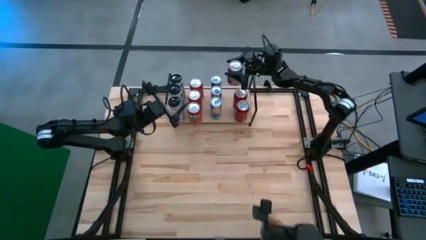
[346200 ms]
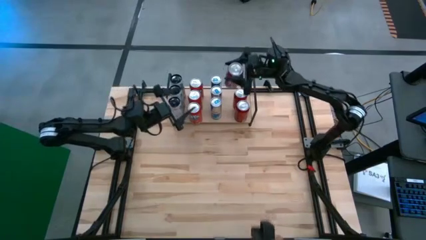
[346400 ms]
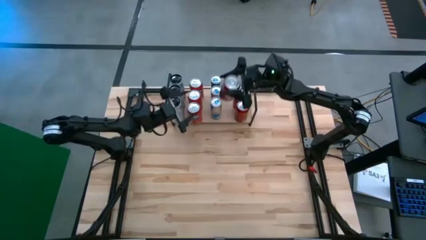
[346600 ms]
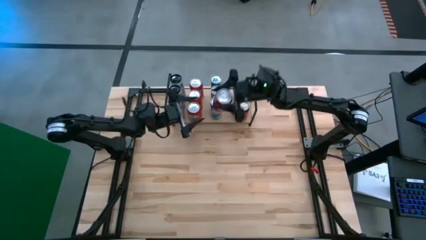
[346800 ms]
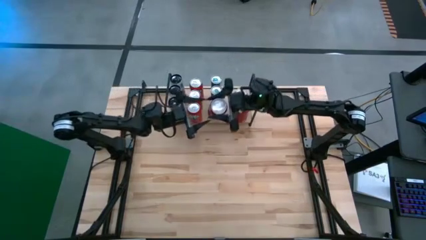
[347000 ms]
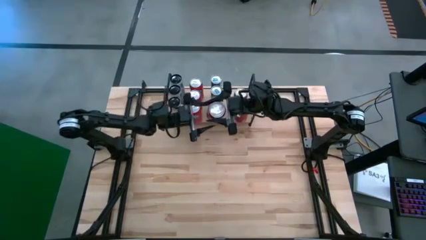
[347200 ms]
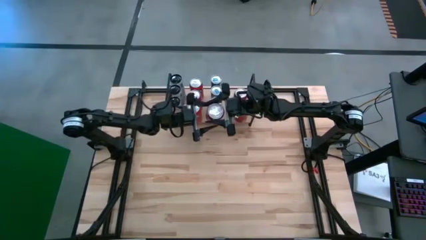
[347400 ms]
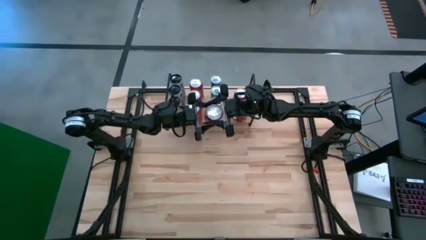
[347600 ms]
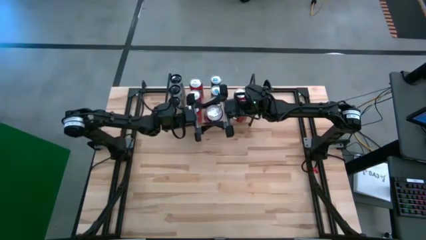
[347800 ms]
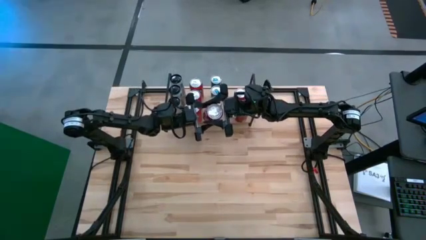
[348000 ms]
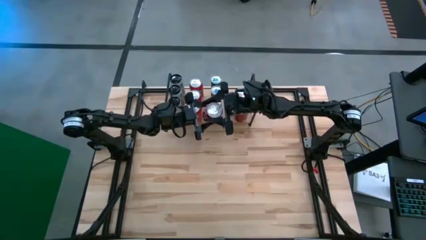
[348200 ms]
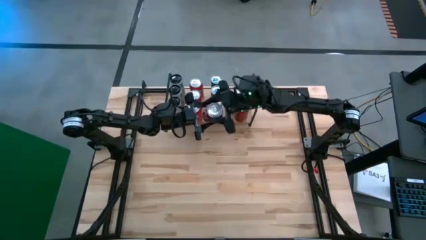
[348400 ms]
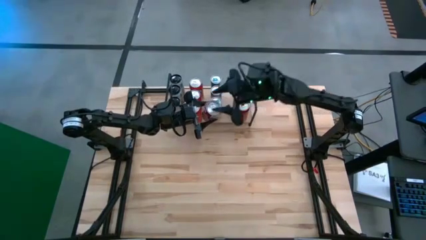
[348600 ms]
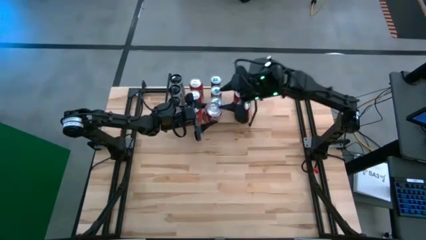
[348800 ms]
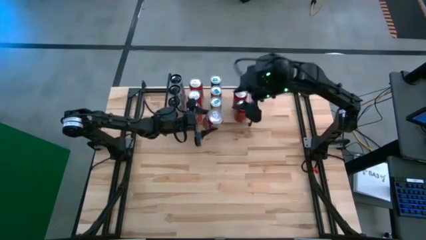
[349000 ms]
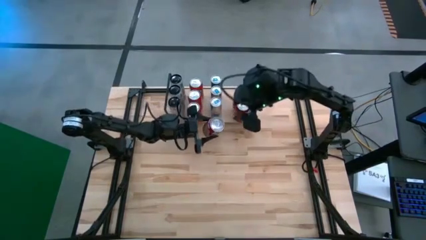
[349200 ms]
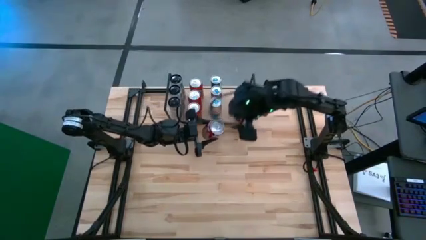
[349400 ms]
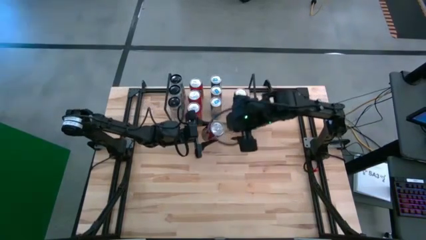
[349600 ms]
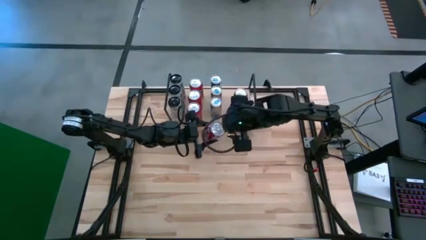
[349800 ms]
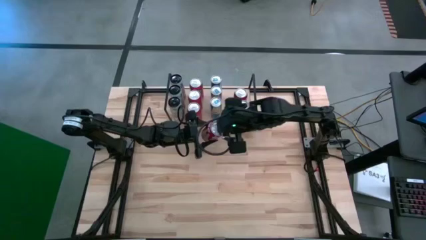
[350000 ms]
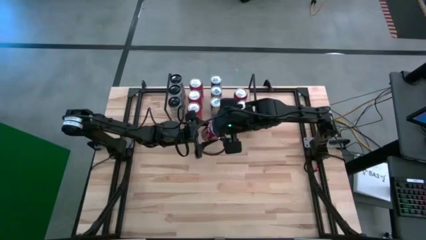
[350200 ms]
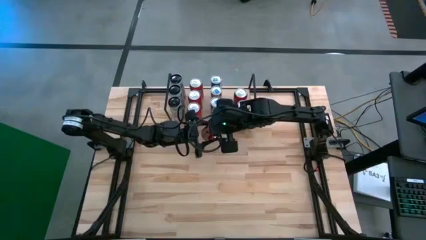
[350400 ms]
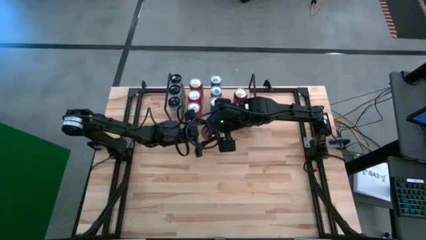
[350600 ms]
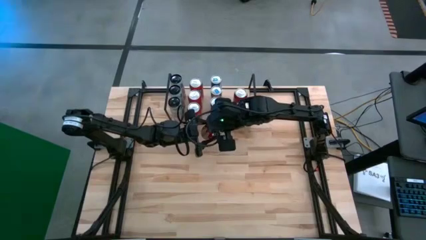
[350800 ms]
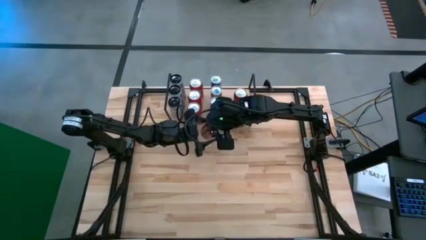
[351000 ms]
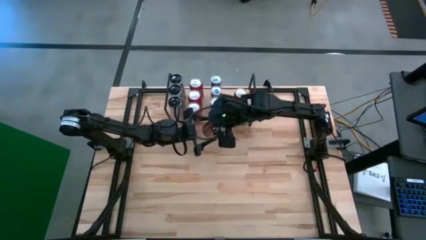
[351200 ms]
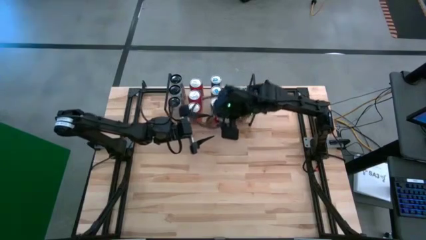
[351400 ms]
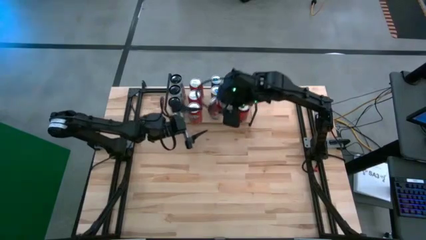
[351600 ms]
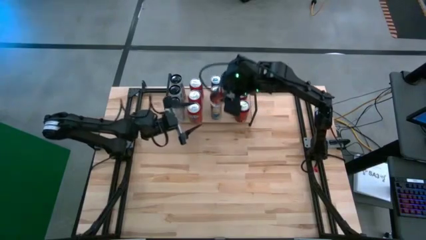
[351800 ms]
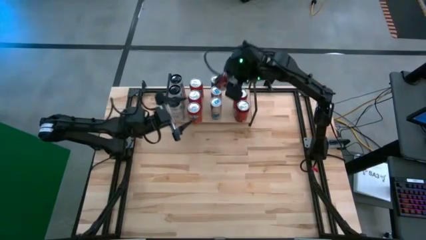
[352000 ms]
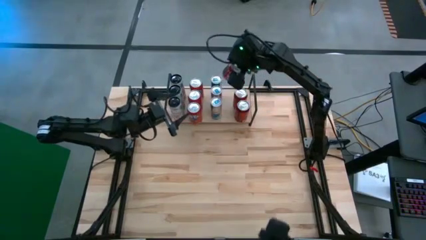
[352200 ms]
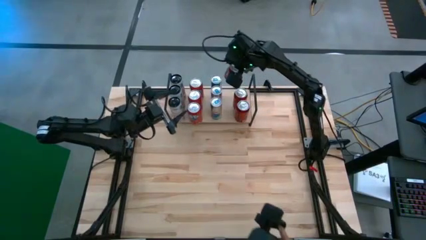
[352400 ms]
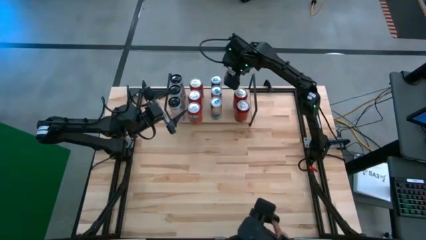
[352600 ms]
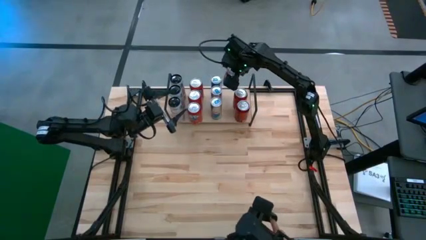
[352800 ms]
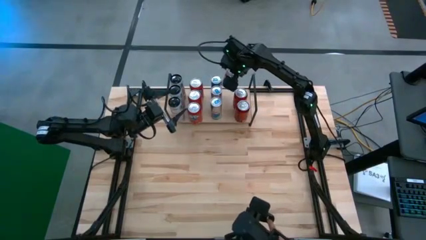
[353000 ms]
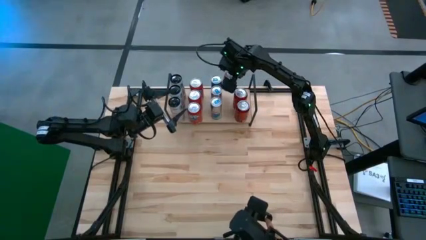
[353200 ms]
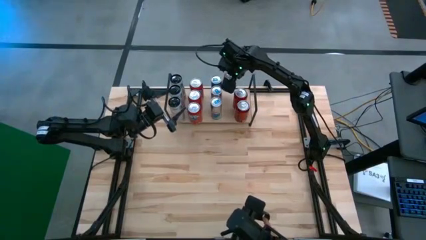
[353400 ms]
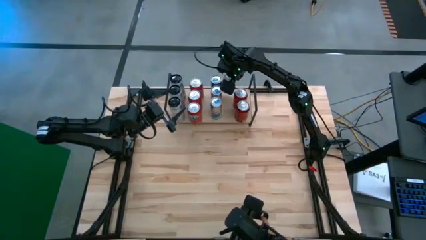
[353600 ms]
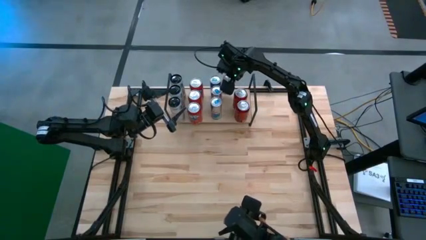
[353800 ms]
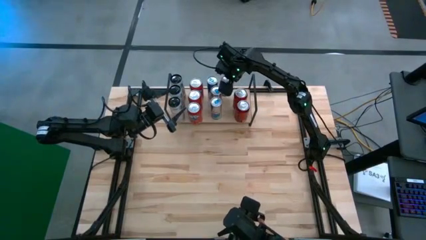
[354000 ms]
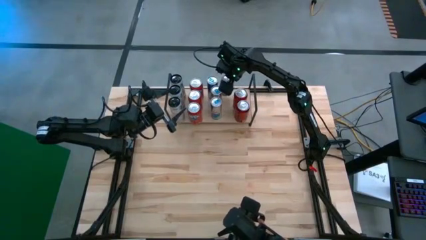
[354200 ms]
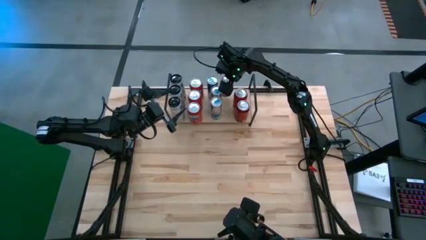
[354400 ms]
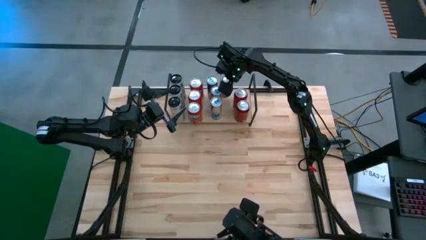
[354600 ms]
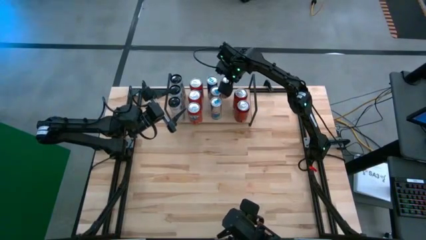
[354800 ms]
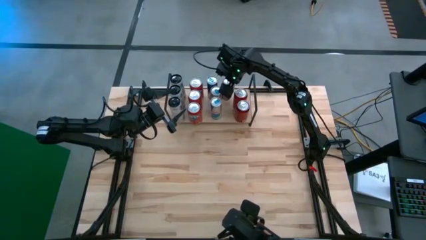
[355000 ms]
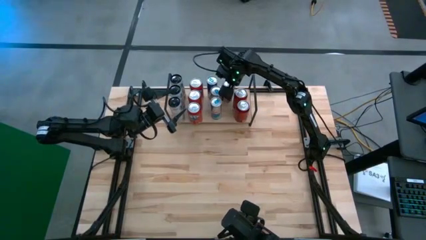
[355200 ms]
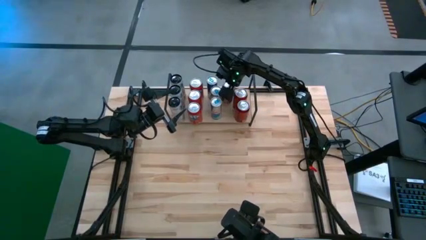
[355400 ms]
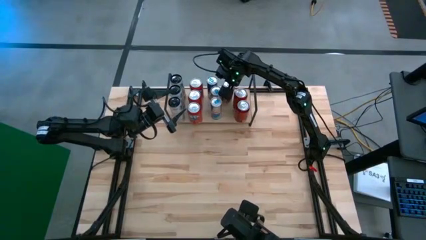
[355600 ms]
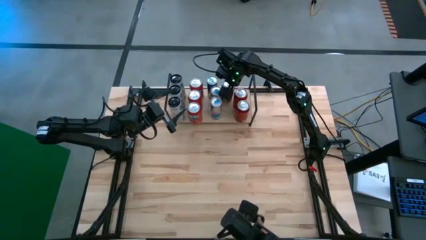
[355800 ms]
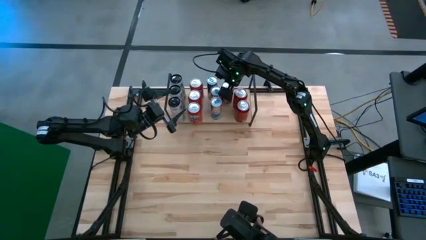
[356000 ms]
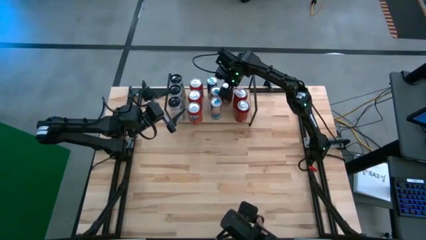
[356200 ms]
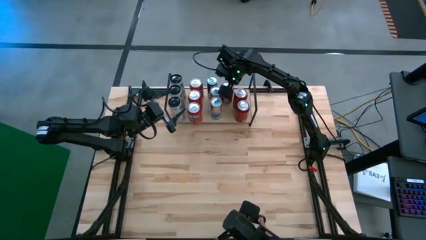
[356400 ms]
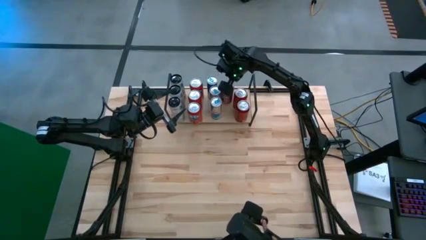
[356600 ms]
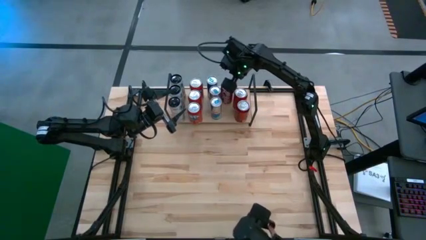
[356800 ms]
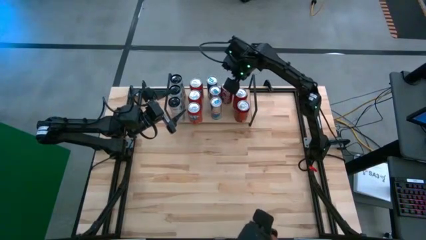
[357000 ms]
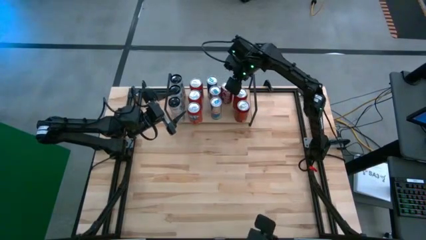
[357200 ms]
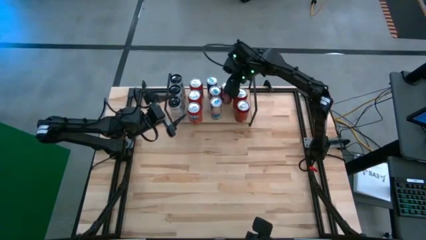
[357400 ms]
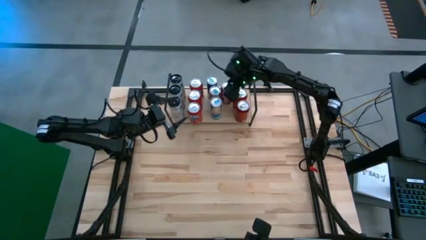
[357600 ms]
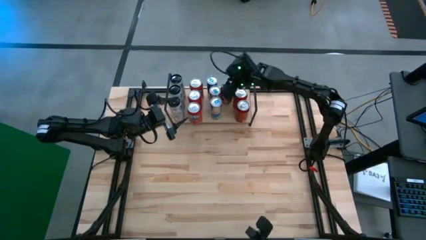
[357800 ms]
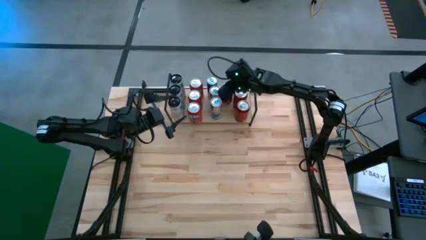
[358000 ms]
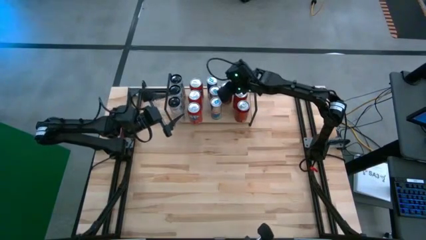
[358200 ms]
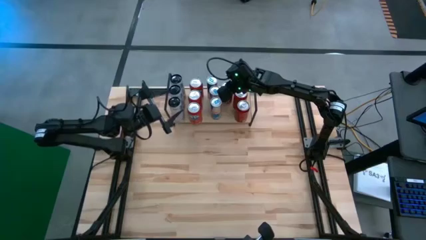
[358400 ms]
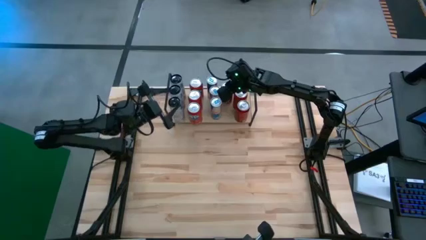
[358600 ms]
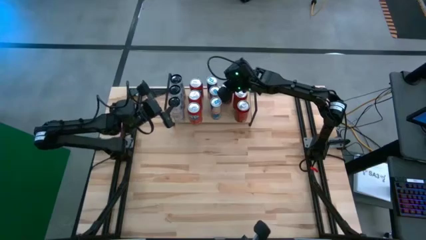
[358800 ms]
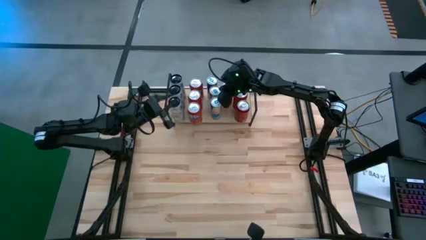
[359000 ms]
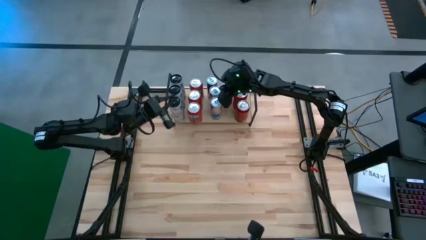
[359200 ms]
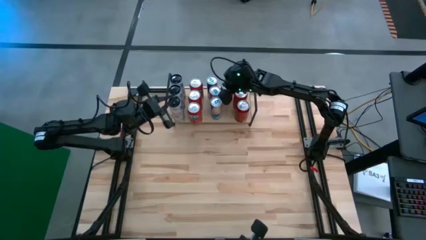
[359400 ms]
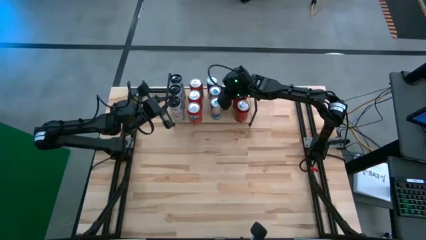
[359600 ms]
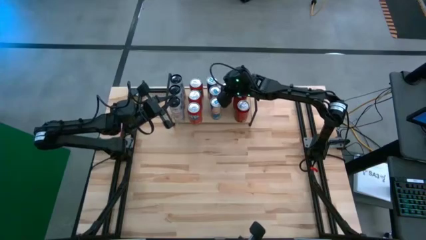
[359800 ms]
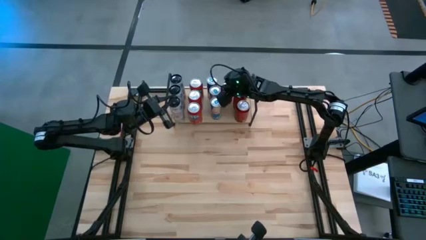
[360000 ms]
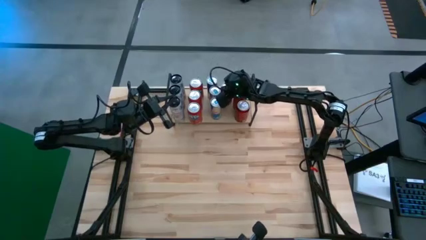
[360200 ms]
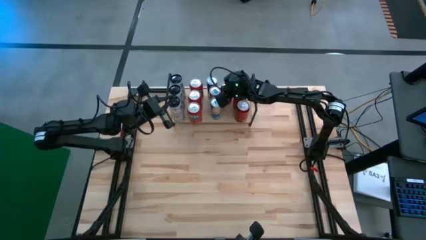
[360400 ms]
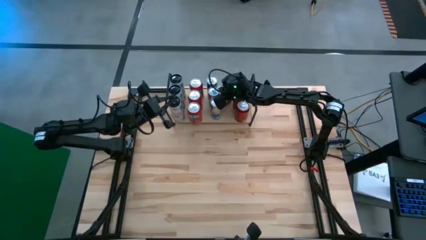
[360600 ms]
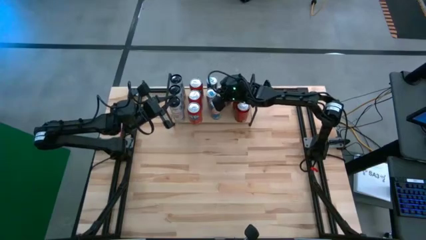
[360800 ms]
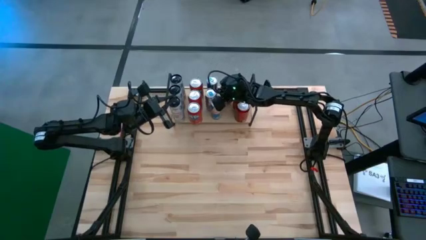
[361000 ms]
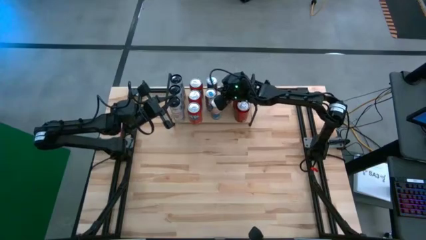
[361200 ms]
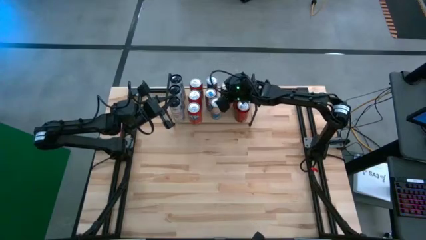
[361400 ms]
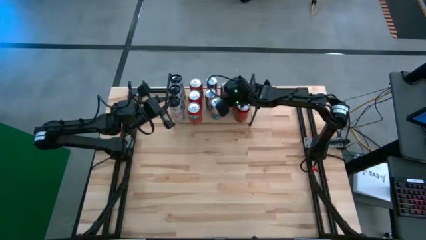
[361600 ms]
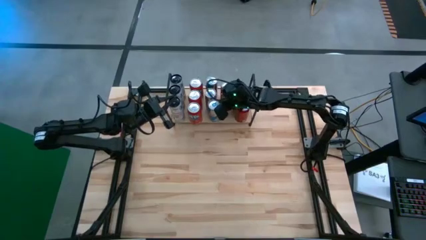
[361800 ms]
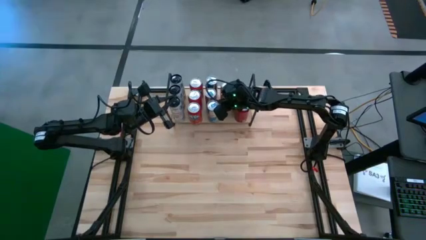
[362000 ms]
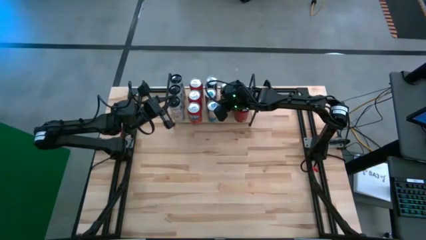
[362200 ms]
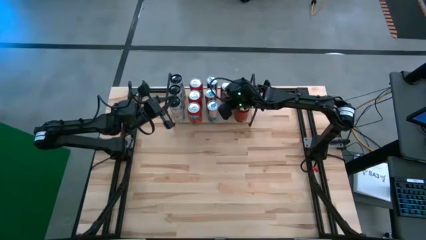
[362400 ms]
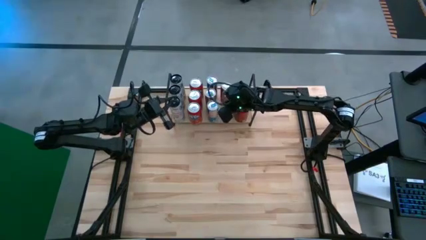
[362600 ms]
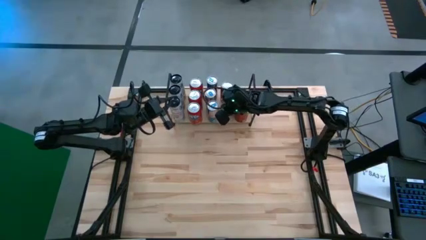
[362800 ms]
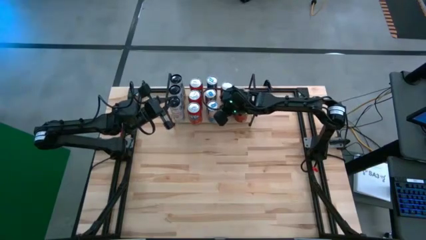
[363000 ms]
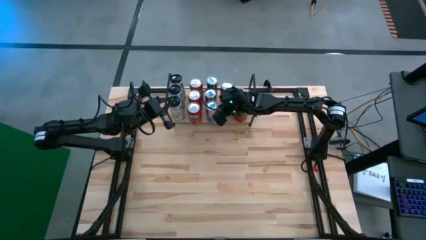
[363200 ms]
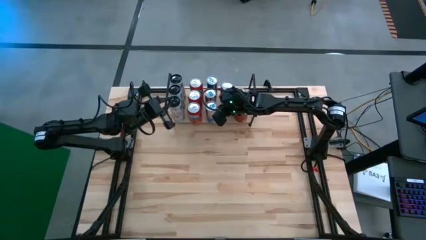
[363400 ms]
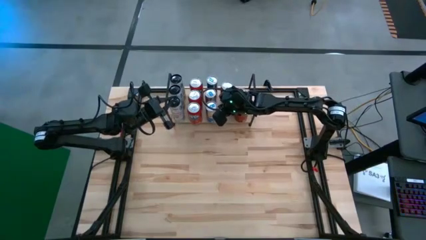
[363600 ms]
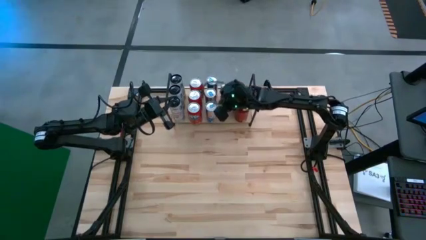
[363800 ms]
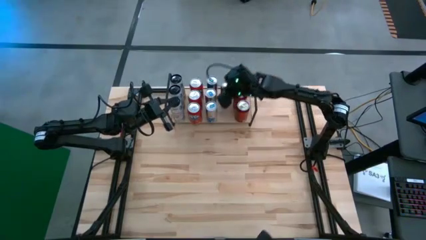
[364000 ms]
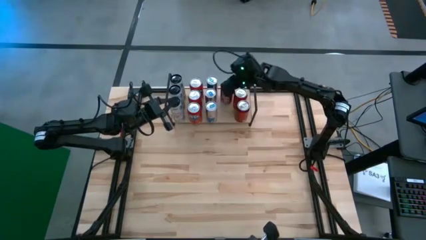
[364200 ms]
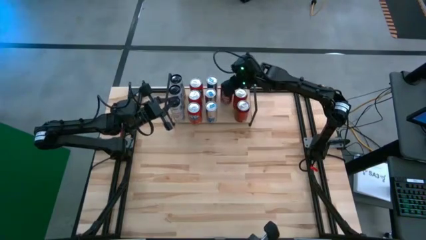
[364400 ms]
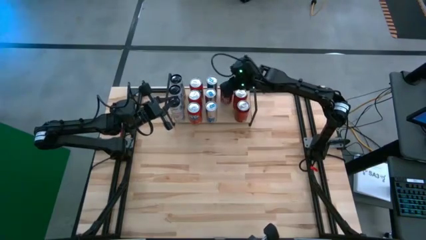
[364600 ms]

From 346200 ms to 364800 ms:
Task: Place canned beverage on shelf
Put the red soda on the shelf aligned with the other red soda cans
